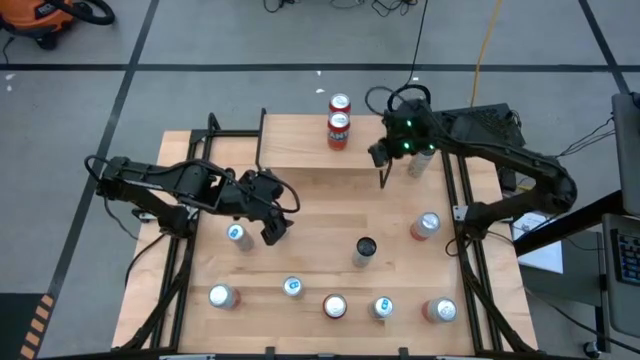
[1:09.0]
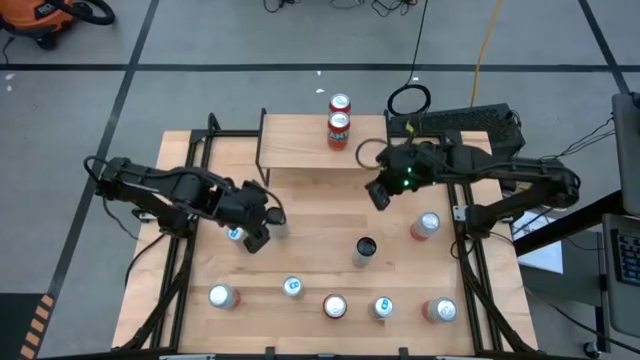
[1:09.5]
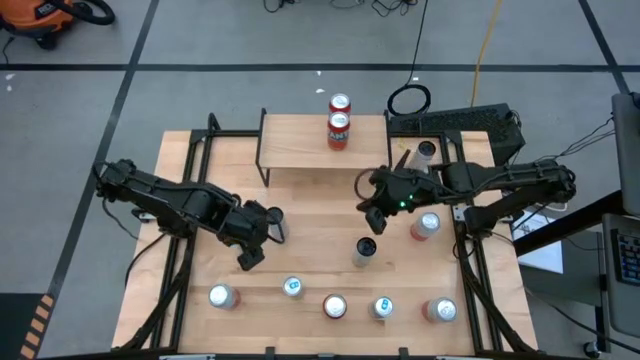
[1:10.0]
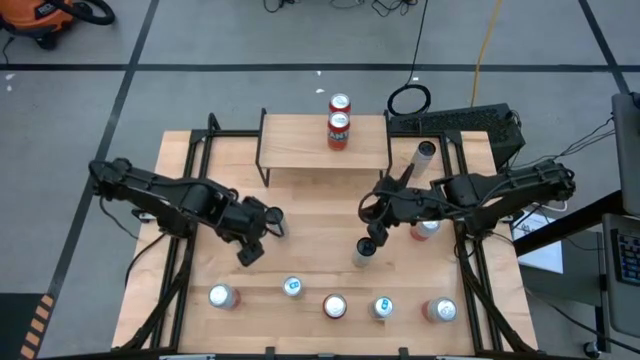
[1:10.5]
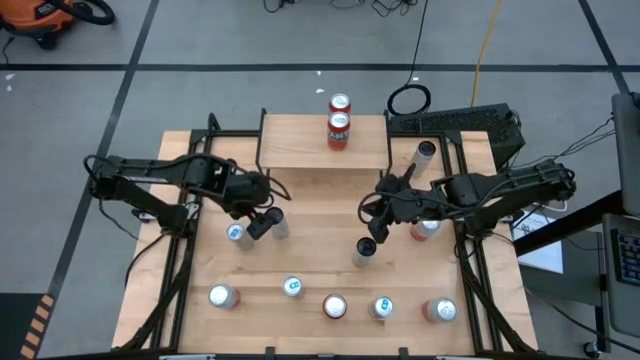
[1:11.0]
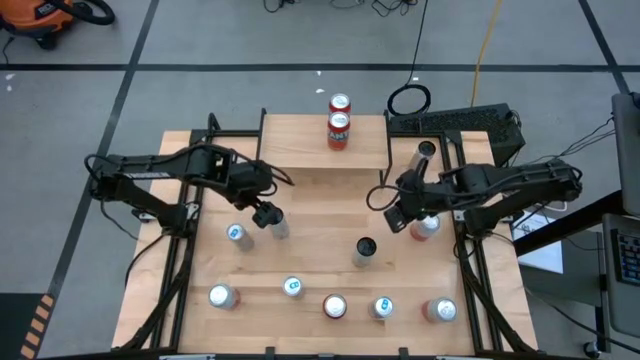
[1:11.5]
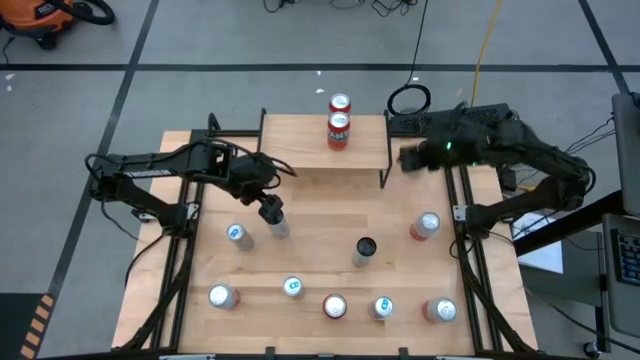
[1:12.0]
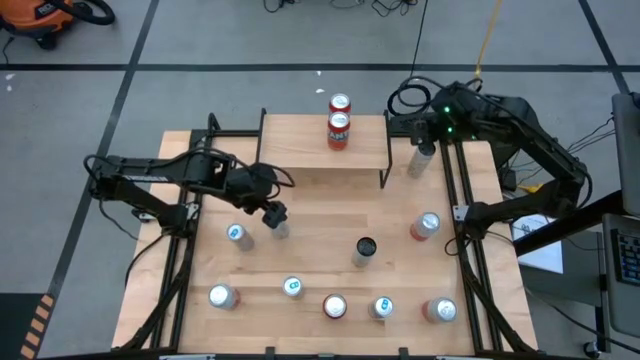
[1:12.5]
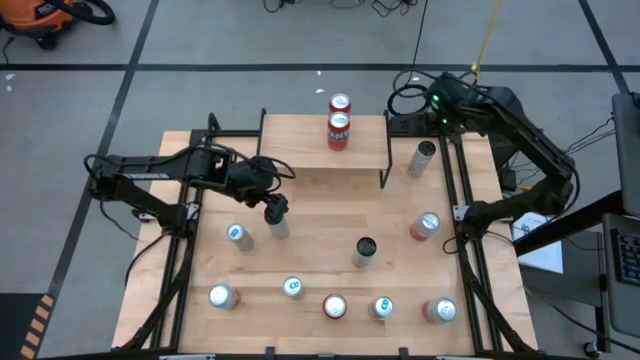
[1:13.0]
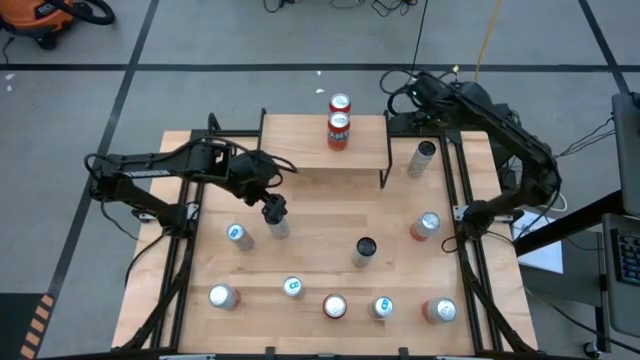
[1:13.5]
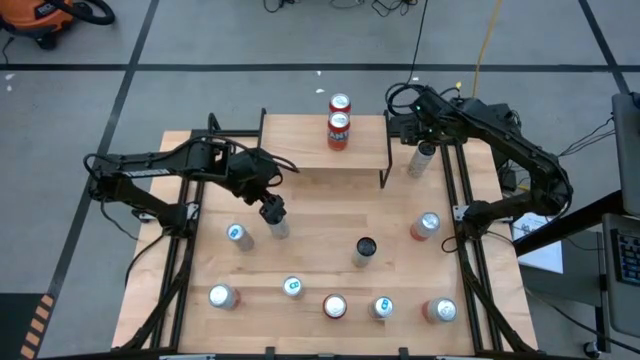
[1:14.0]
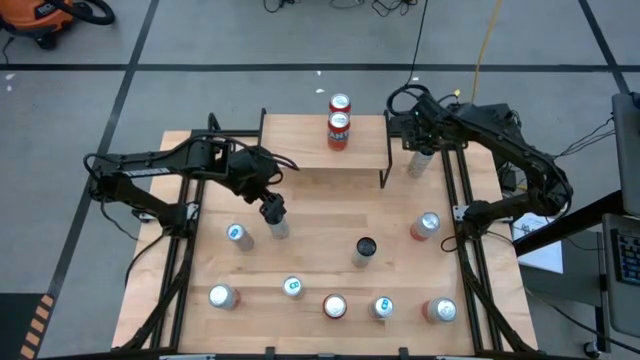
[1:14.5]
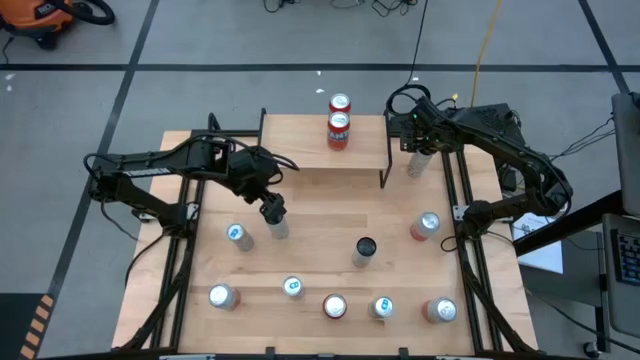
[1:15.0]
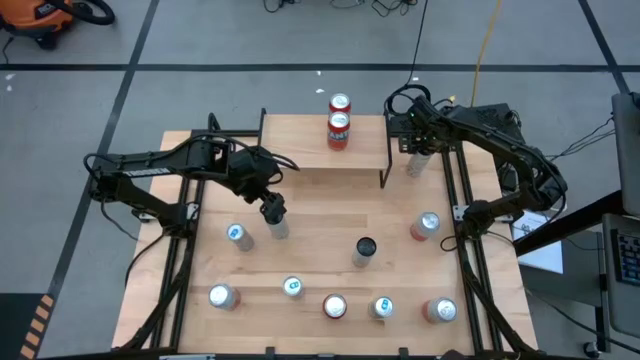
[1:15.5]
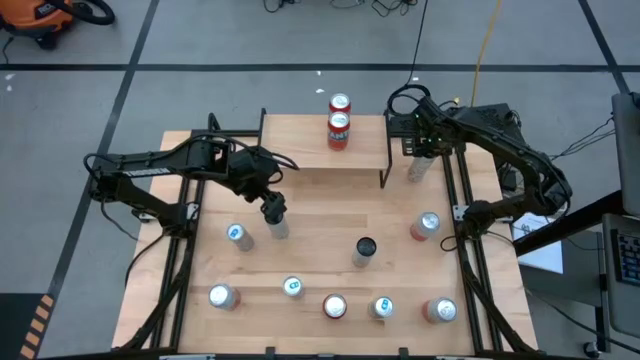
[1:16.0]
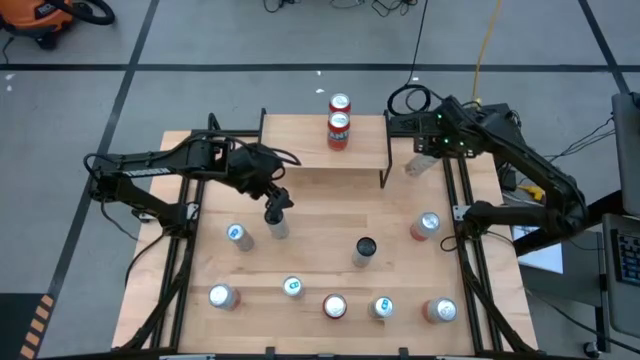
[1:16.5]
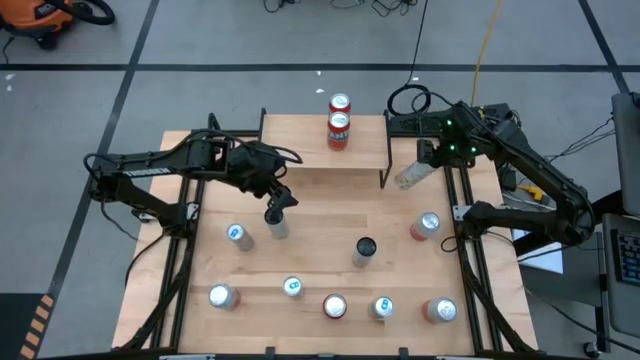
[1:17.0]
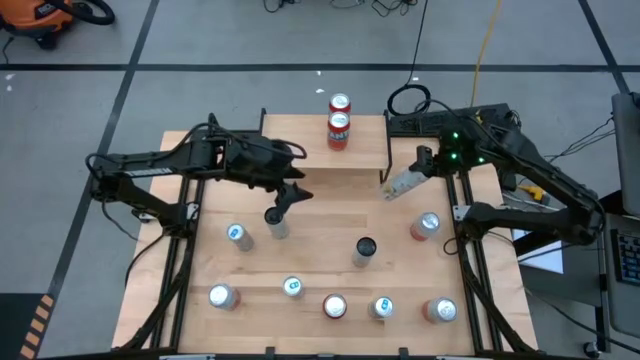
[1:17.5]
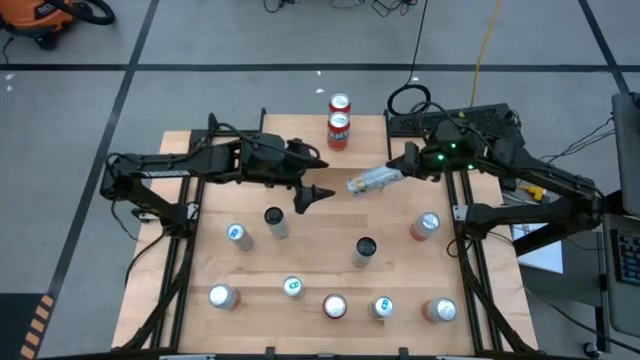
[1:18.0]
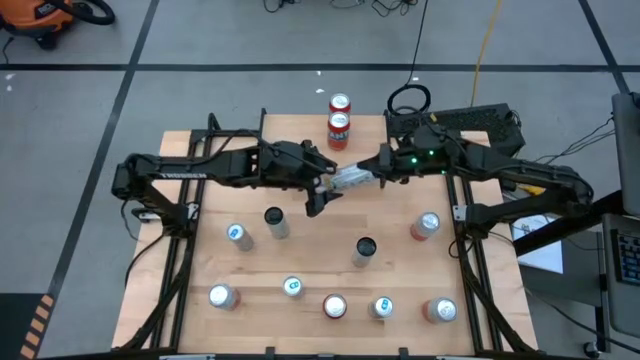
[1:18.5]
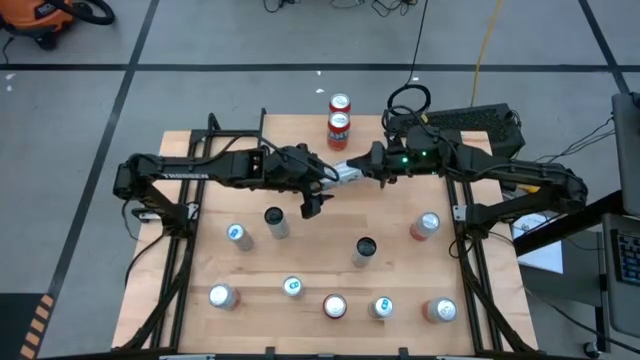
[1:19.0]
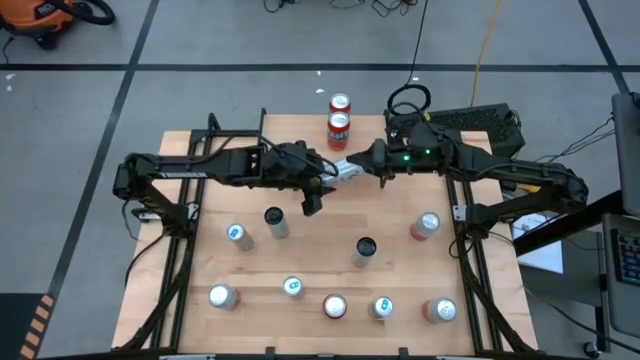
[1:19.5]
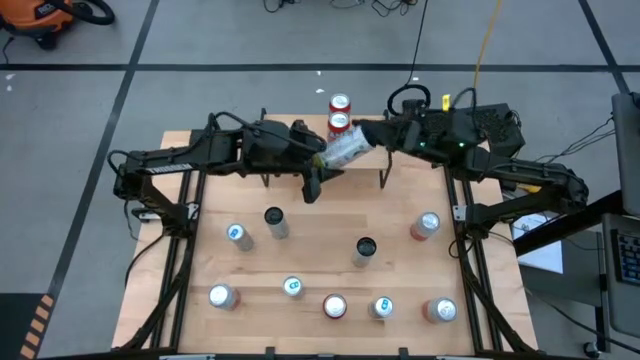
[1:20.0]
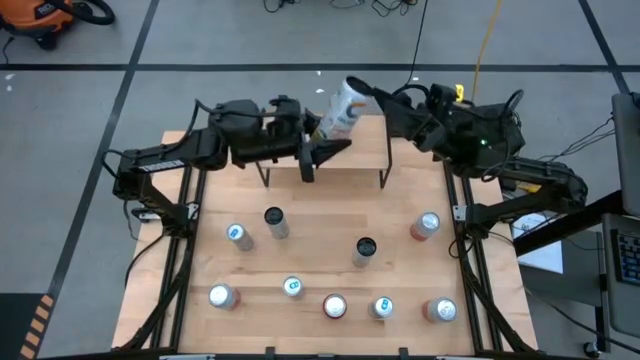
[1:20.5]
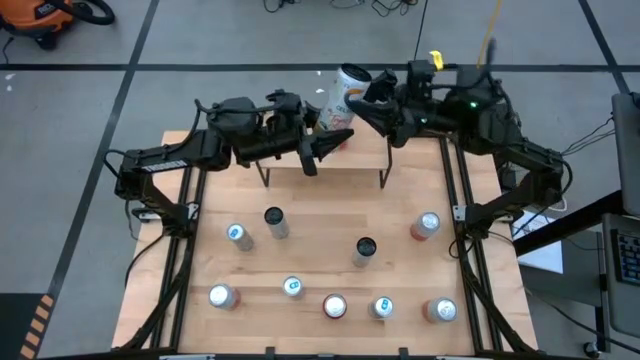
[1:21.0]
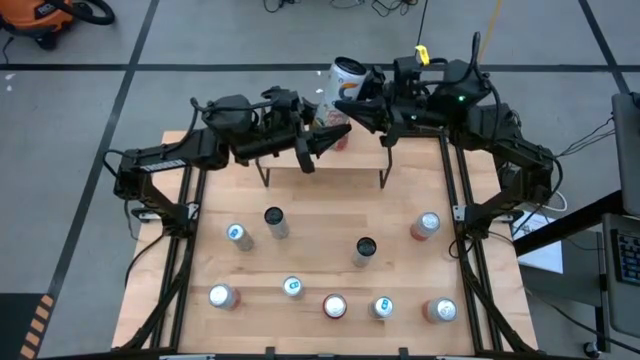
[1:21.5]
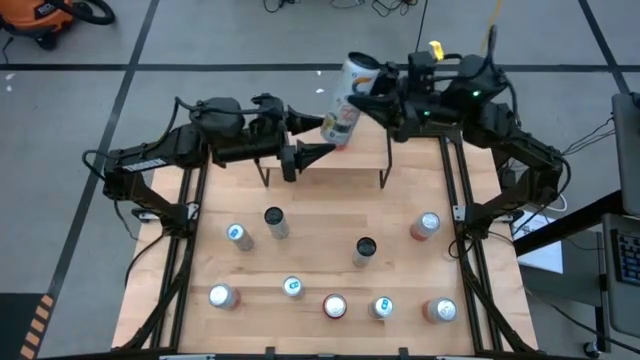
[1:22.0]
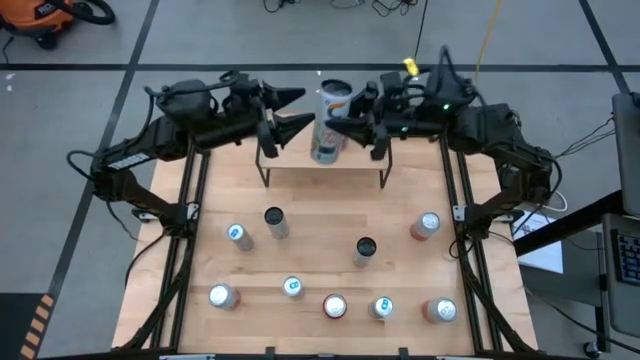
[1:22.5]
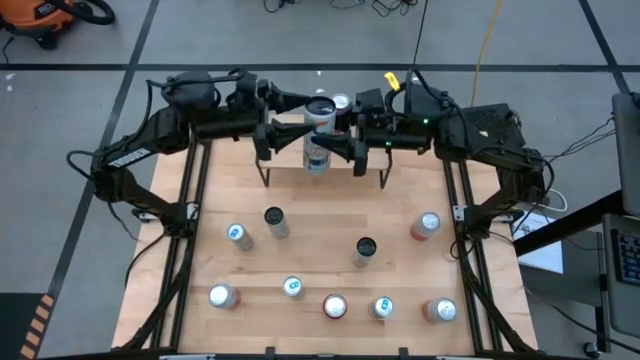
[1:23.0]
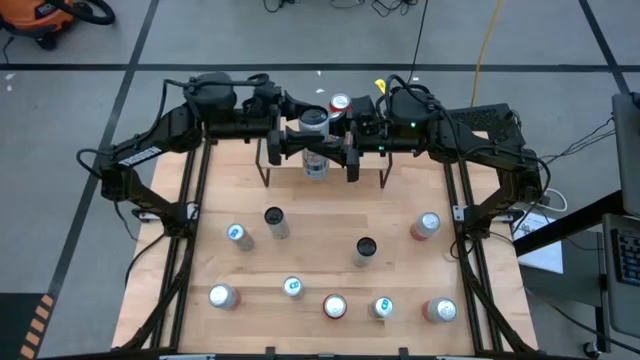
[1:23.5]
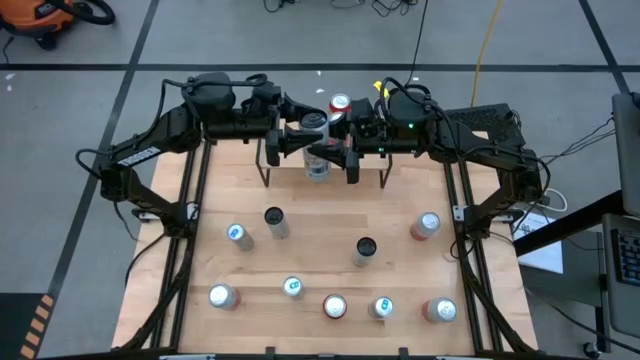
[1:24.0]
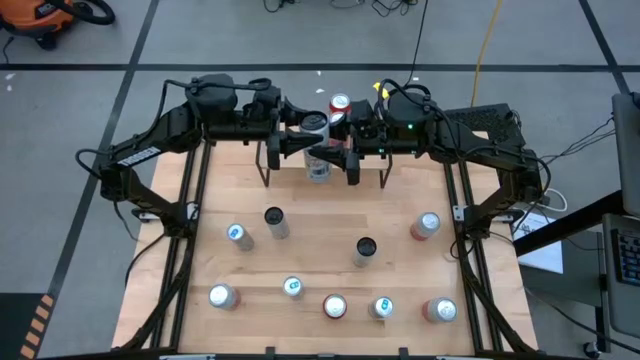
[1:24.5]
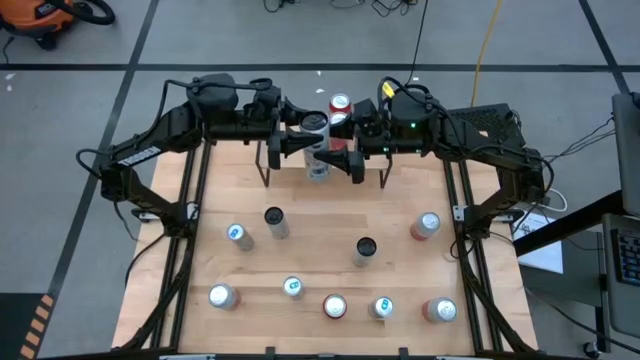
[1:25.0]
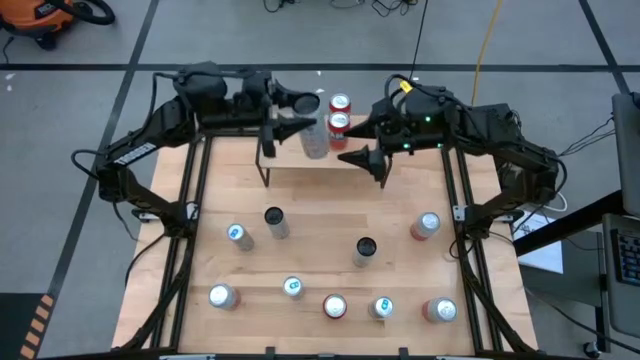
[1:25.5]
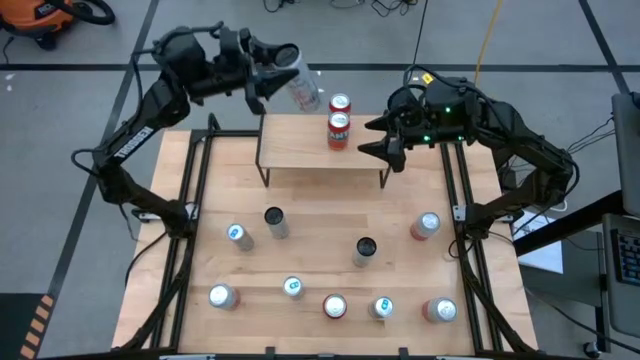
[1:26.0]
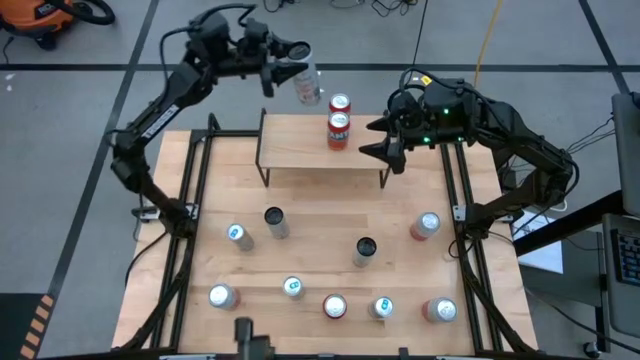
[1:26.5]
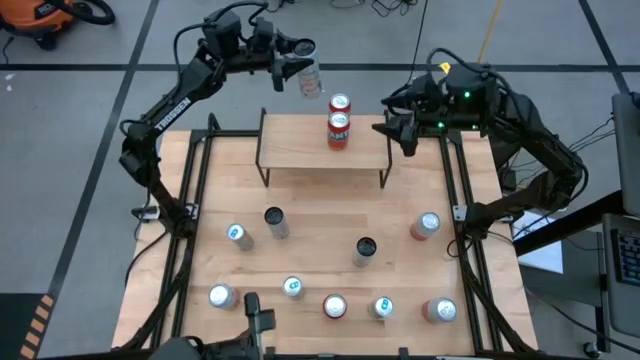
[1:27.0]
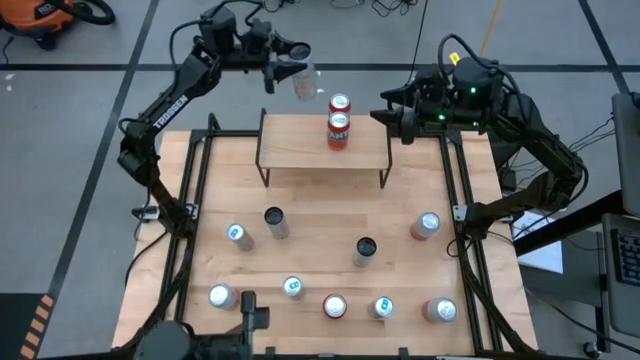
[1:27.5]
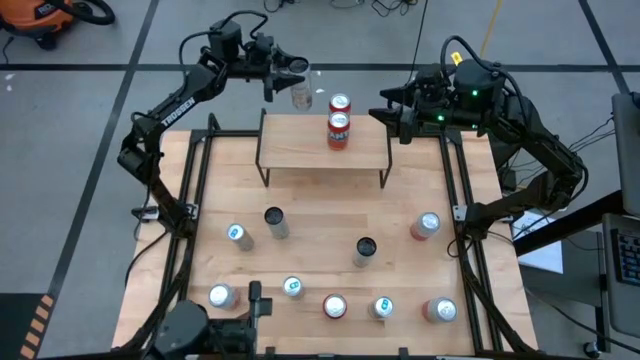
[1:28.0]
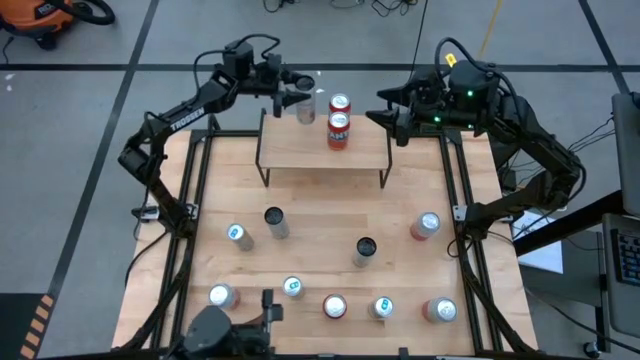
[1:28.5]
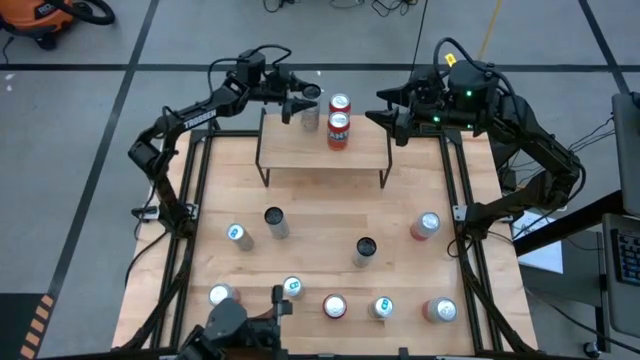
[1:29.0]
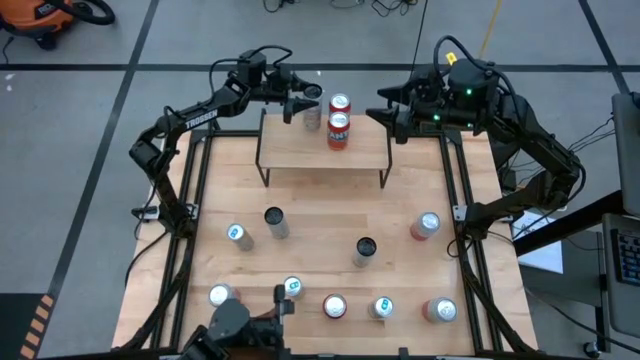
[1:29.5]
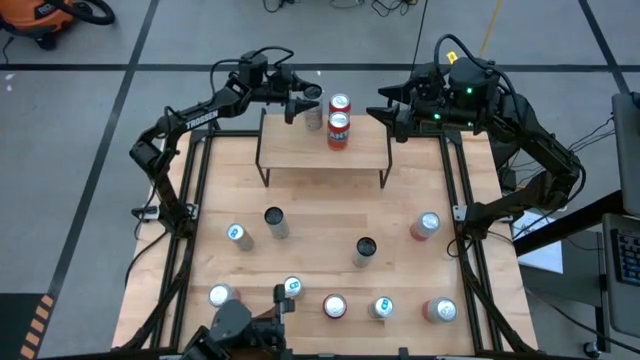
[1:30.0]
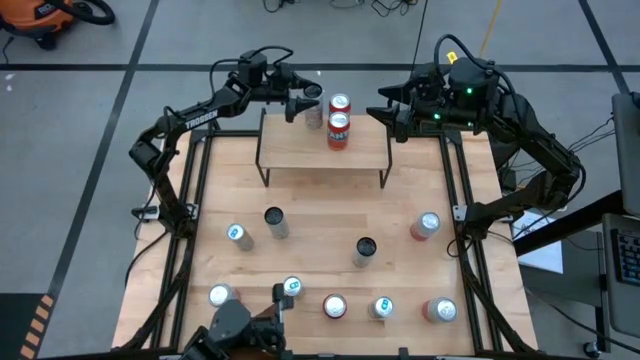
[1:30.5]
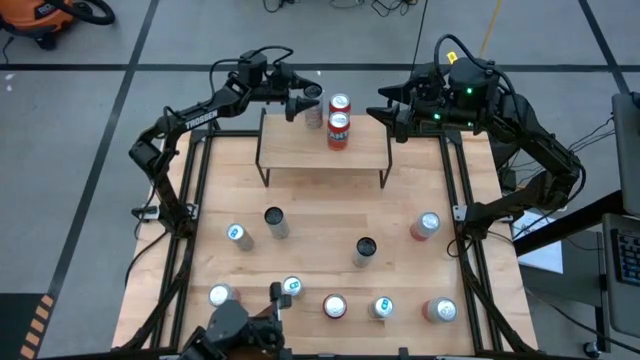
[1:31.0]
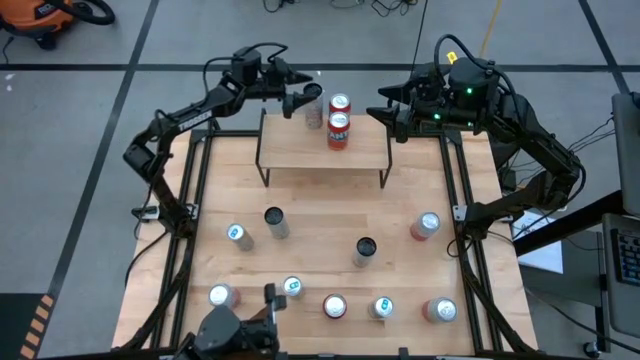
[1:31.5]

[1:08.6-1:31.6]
Task: Place canned beverage on shelf
Put the top right white and yellow soda can on the shelf
